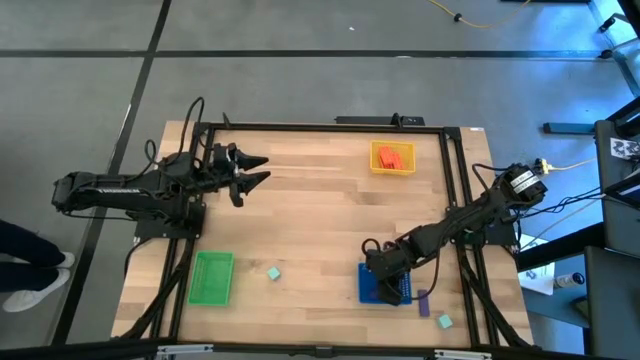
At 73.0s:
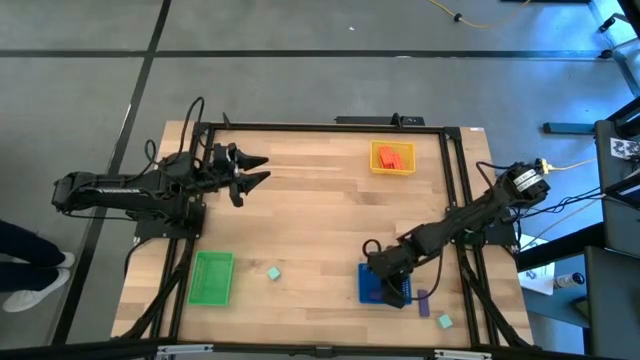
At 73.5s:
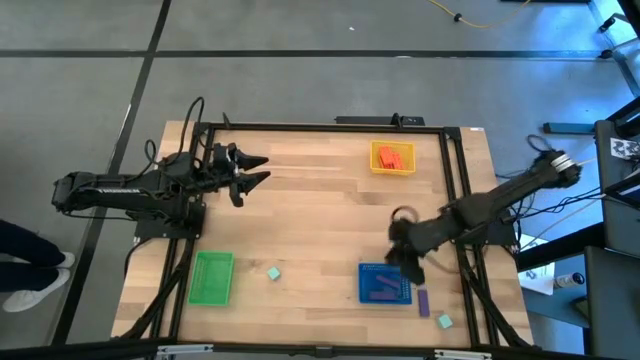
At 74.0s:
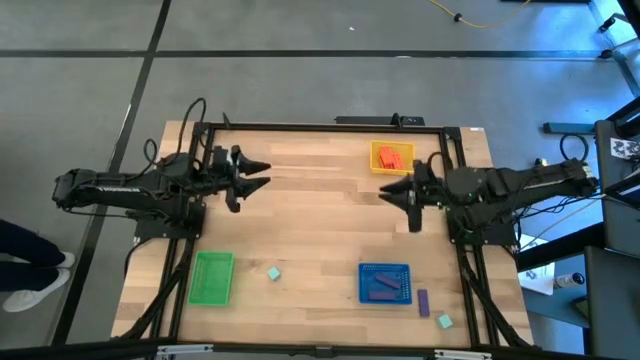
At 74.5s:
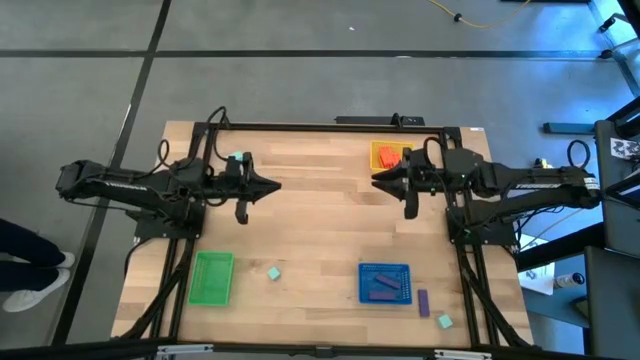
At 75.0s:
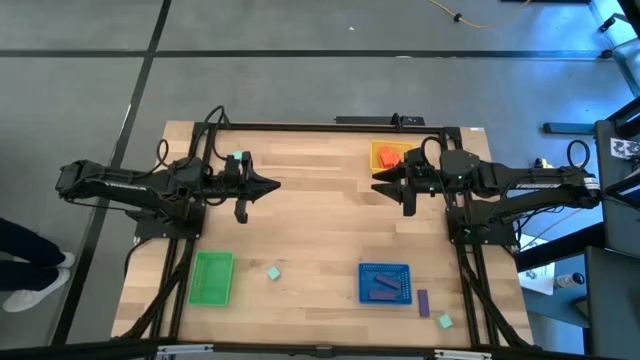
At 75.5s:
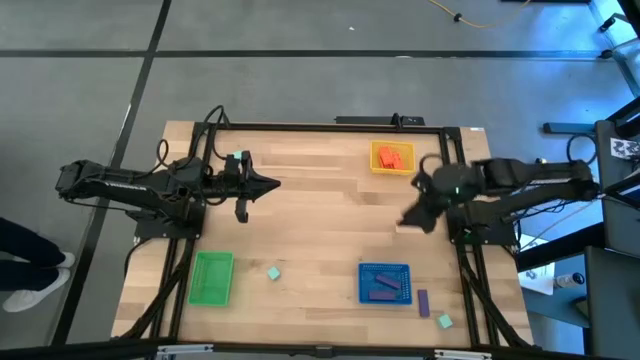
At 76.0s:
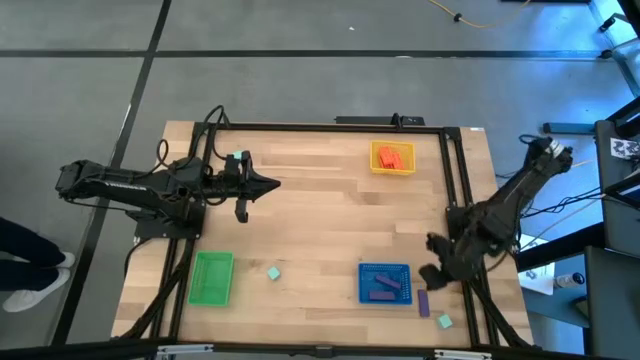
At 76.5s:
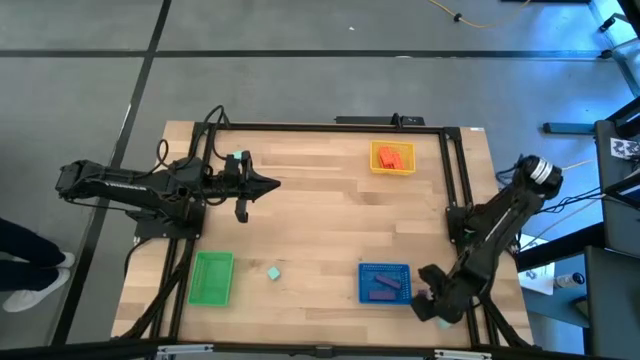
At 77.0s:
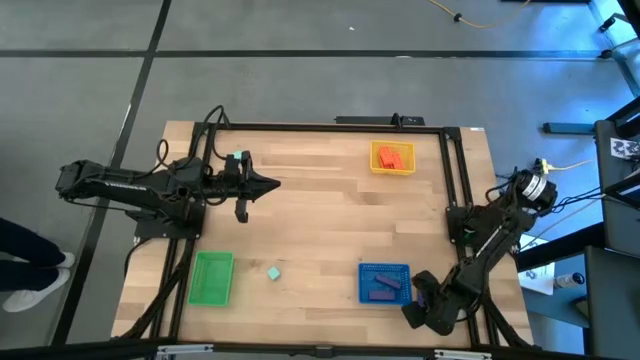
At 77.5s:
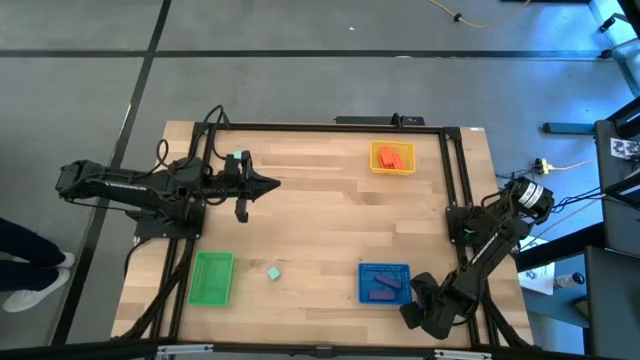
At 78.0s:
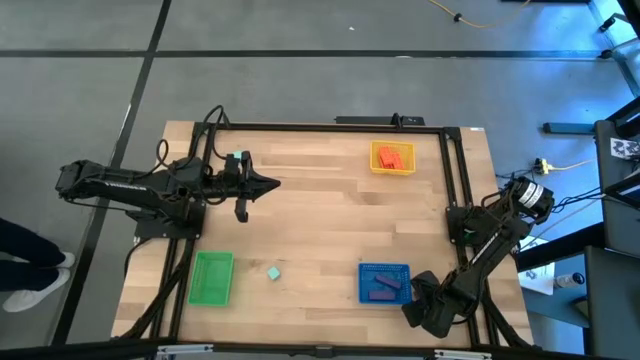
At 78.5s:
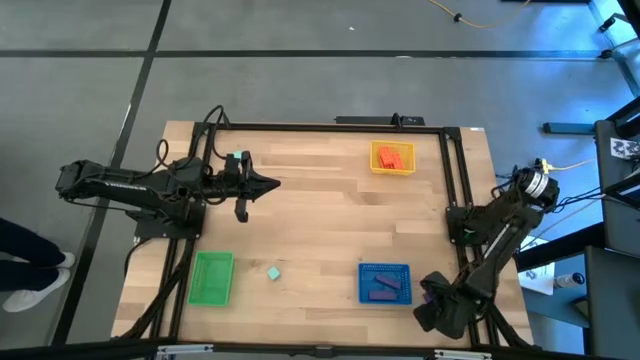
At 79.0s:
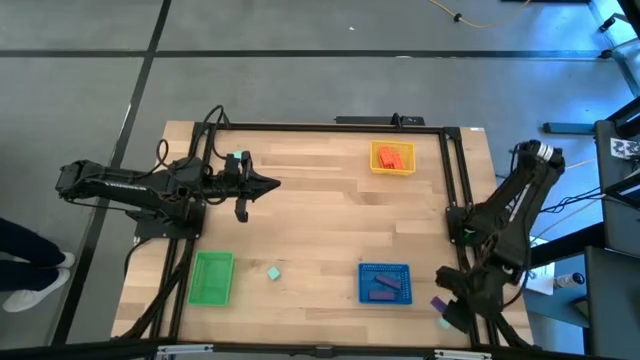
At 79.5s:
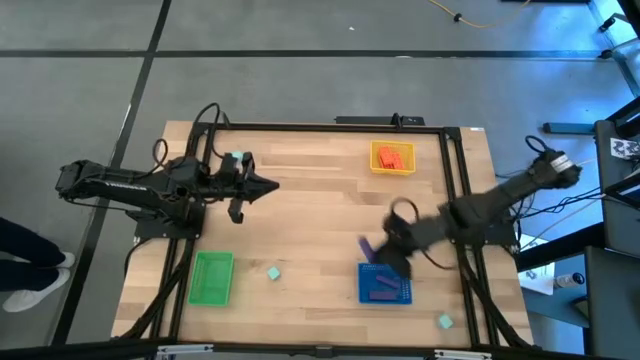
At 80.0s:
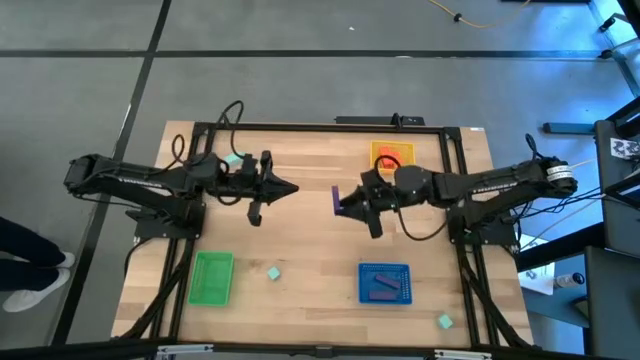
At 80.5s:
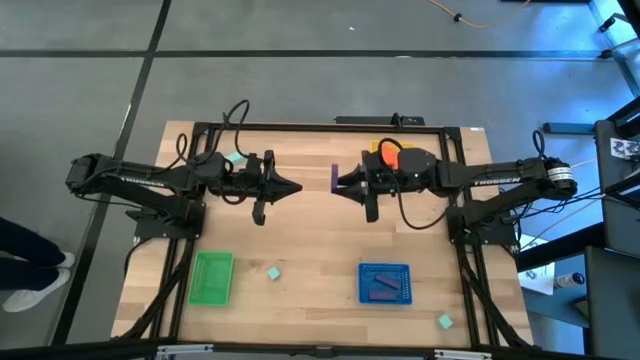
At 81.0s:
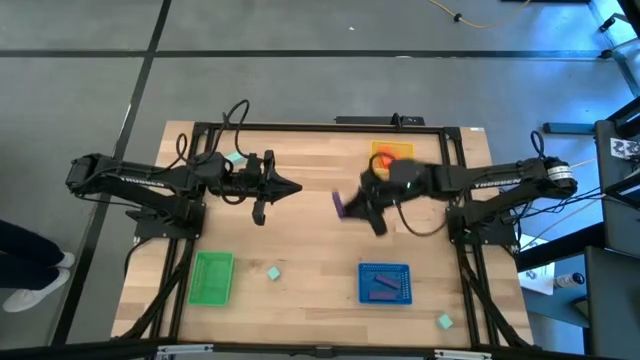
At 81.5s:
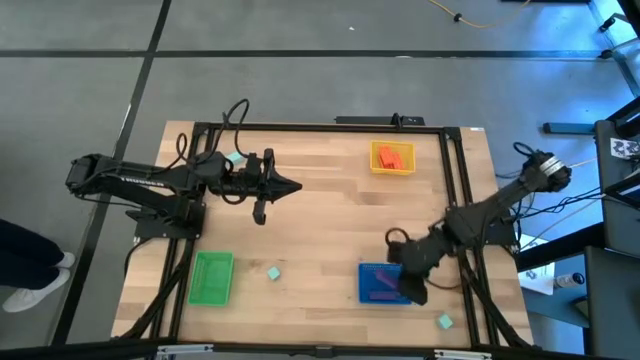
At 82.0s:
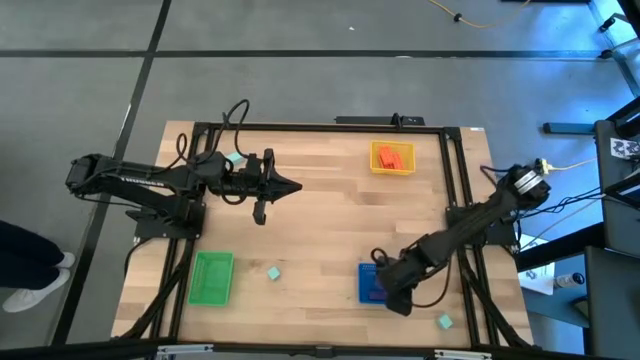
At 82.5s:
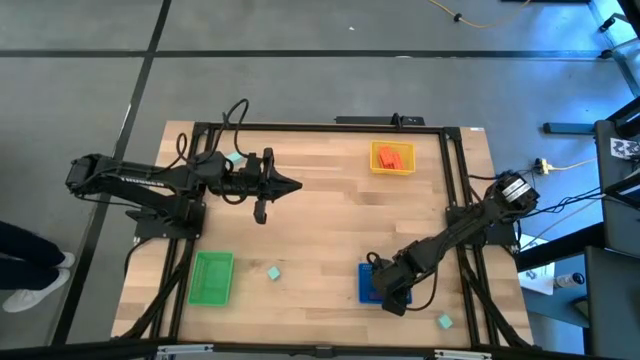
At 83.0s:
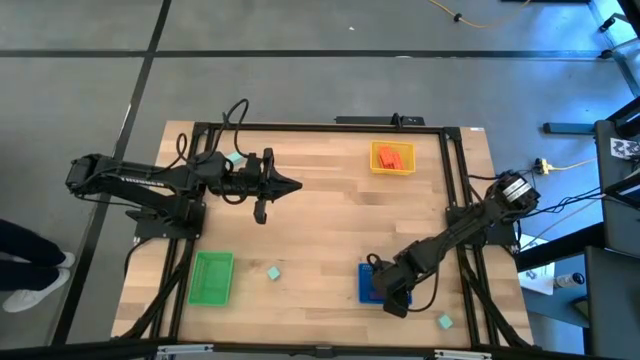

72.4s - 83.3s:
Task: Sort & place blocks by color
Put the purple block into the blue bin

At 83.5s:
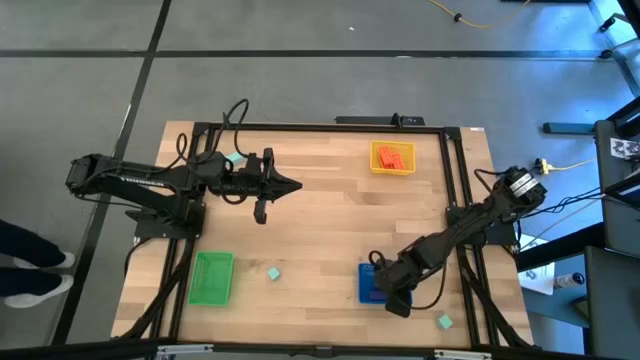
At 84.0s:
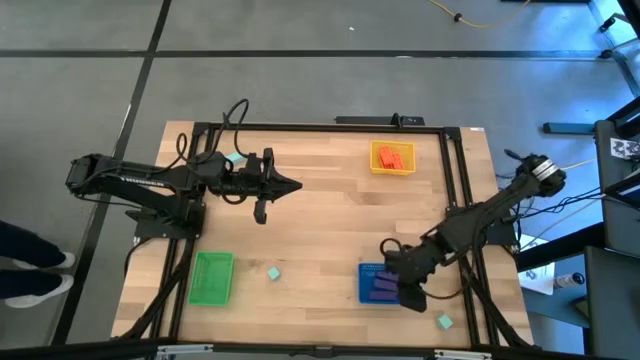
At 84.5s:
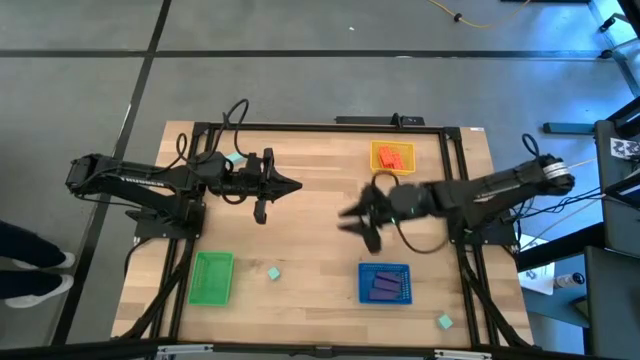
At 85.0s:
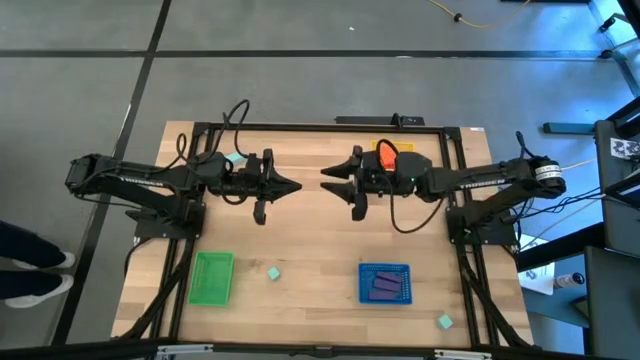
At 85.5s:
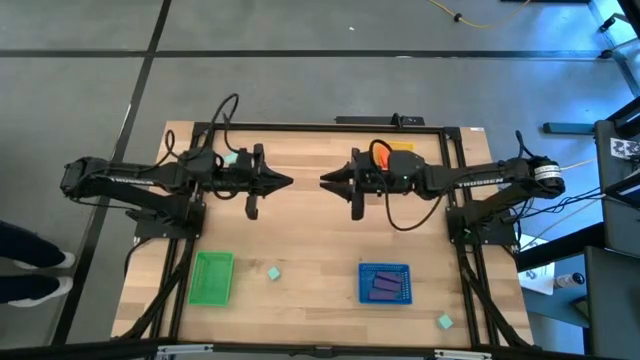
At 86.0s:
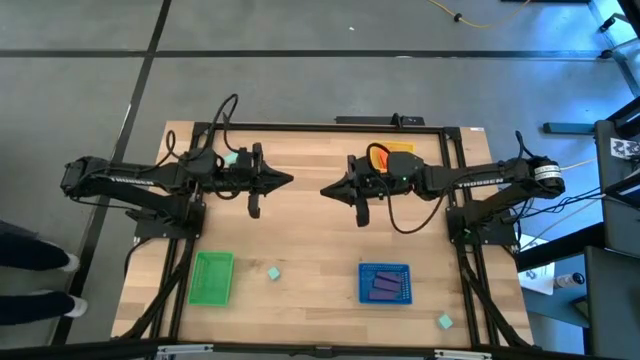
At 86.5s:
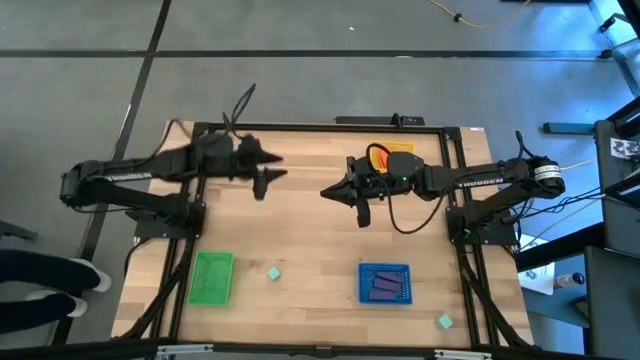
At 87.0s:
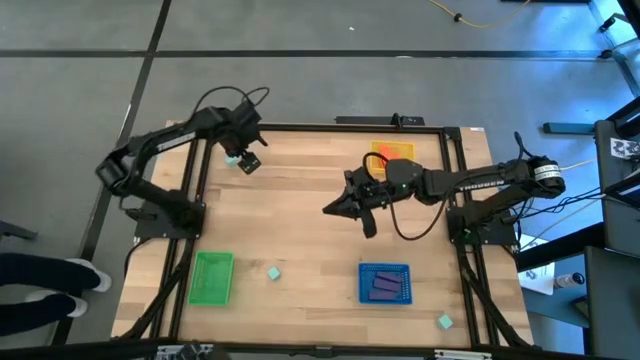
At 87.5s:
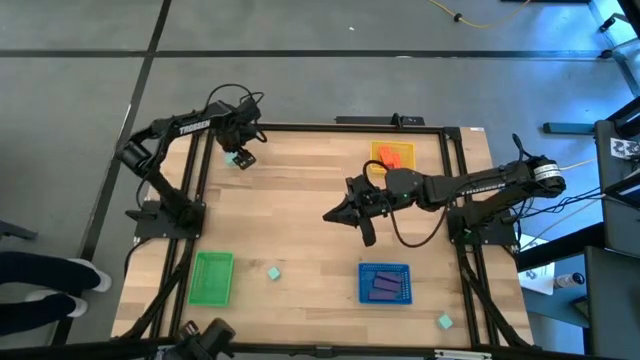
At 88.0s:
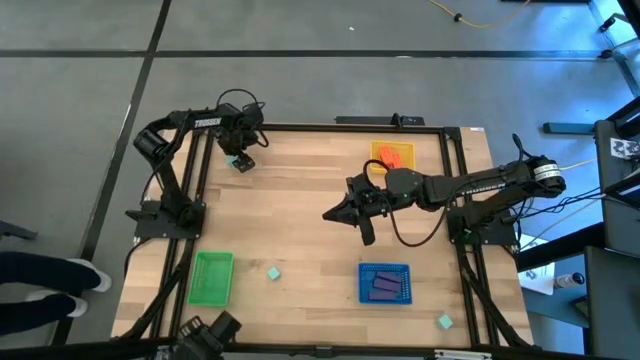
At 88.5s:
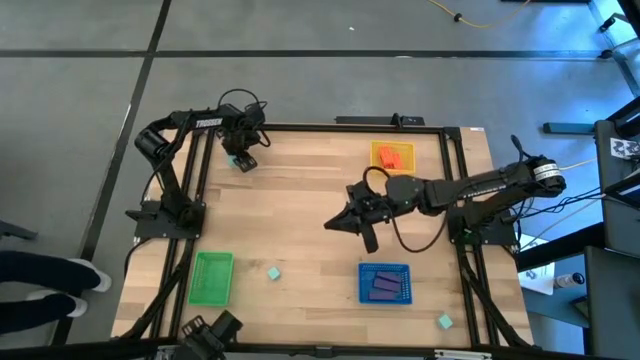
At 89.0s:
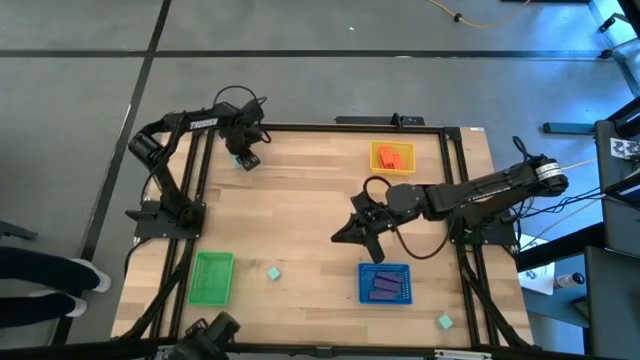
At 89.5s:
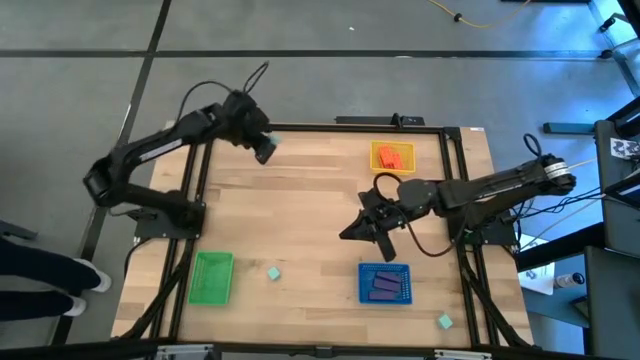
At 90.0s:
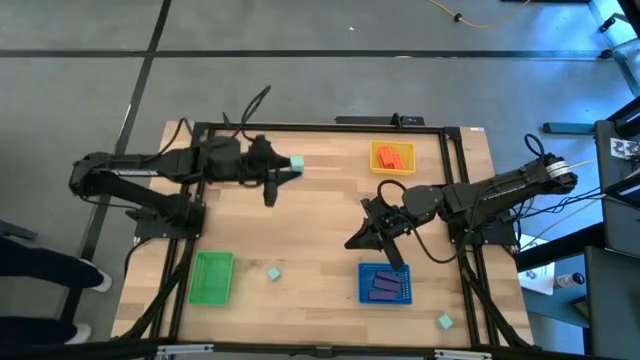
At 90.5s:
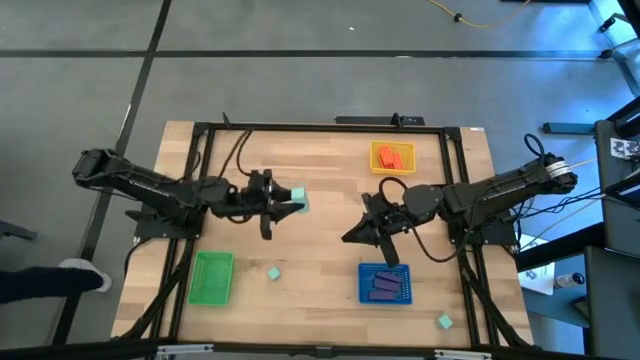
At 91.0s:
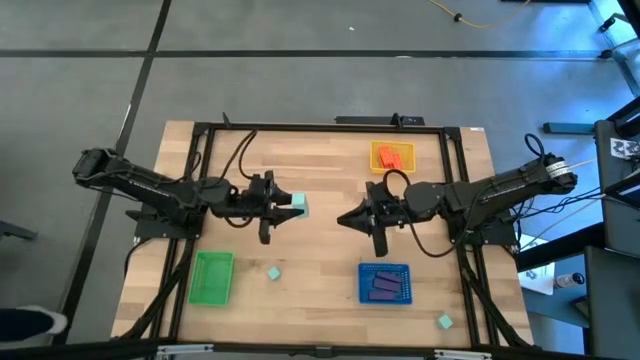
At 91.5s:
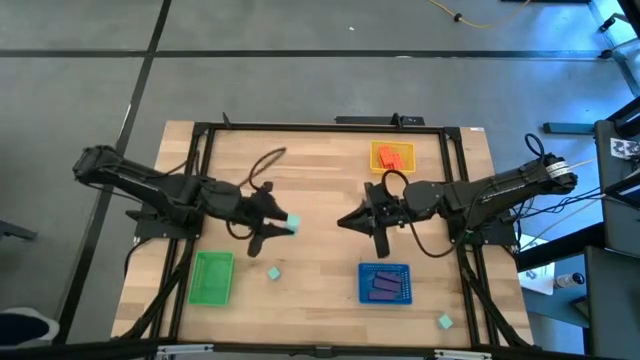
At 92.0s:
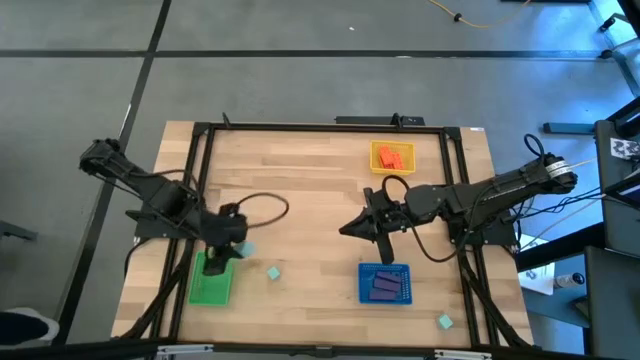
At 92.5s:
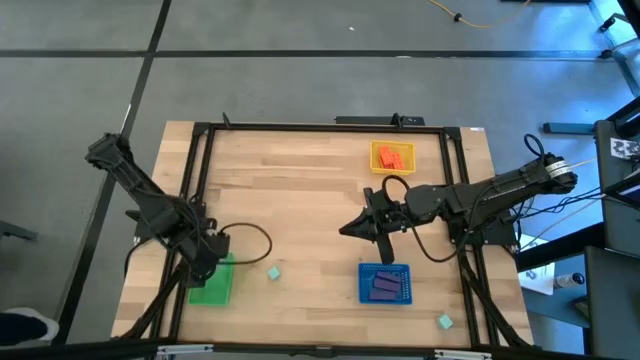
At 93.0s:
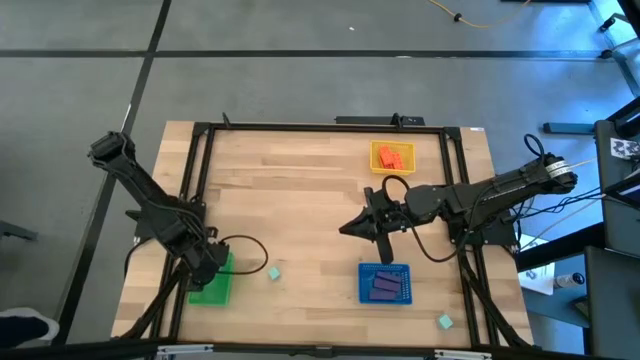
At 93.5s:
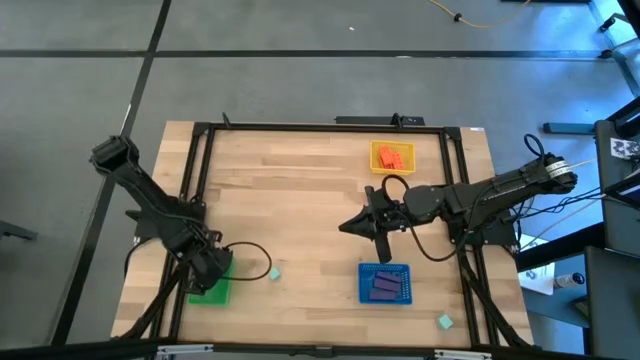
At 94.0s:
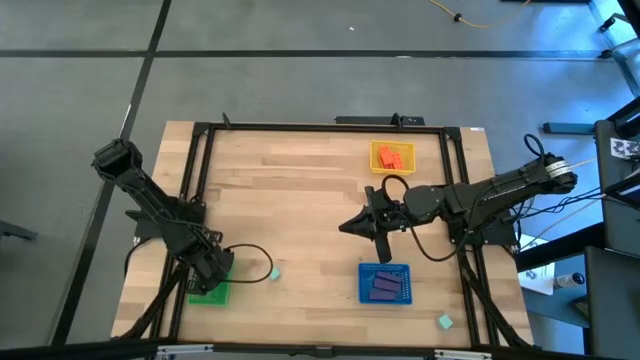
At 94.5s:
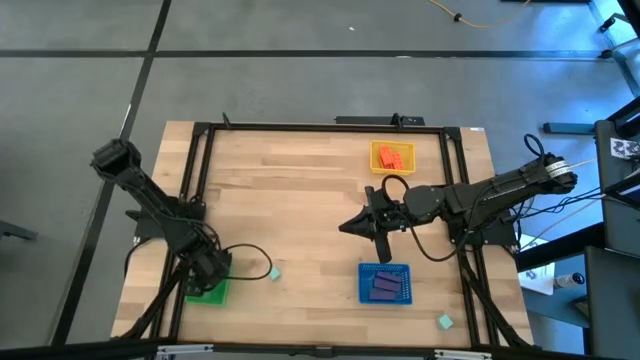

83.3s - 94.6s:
Put the top blue block into the green bin
